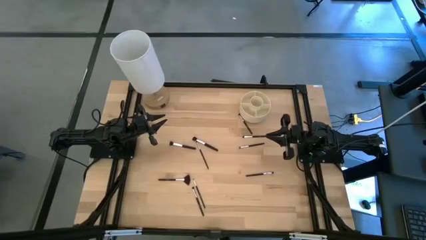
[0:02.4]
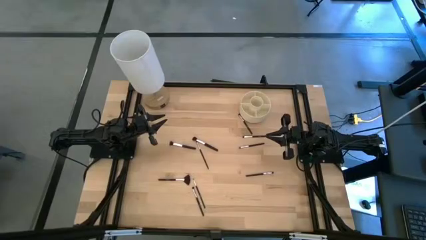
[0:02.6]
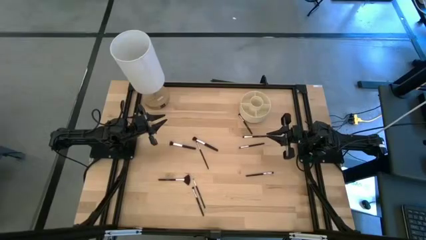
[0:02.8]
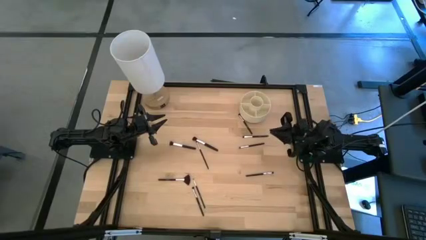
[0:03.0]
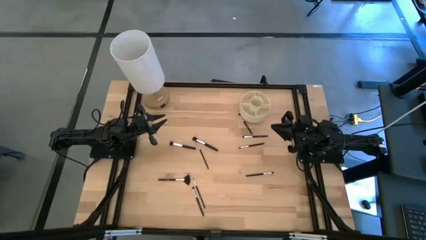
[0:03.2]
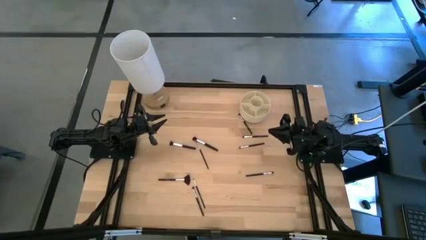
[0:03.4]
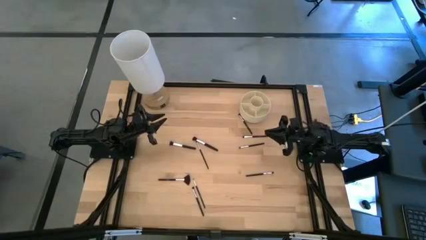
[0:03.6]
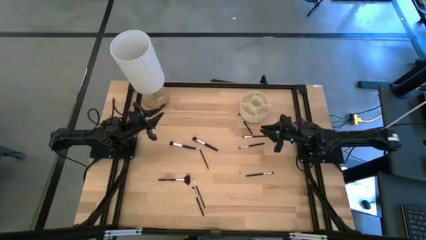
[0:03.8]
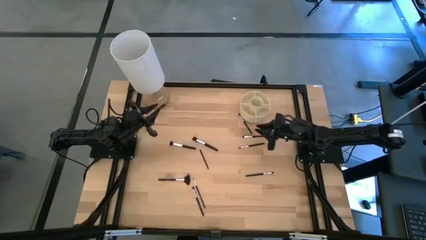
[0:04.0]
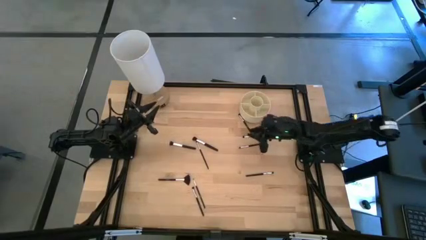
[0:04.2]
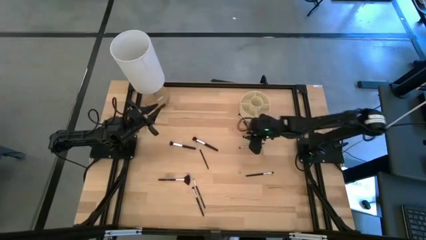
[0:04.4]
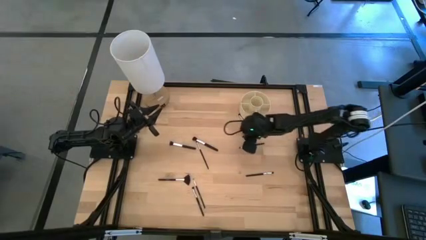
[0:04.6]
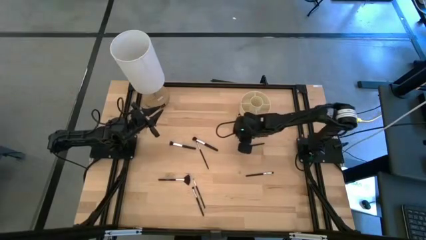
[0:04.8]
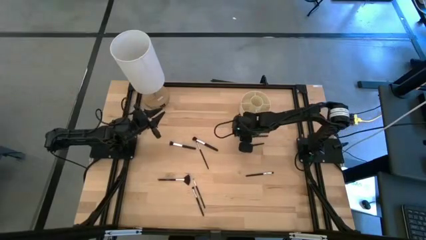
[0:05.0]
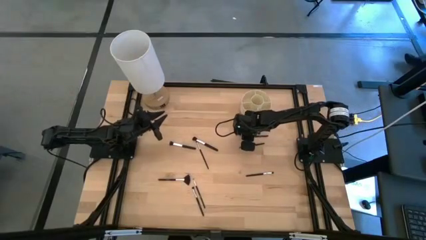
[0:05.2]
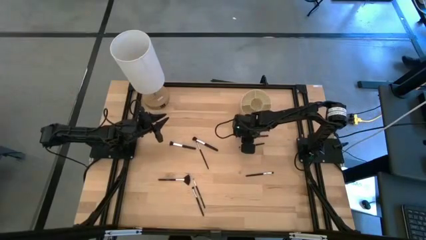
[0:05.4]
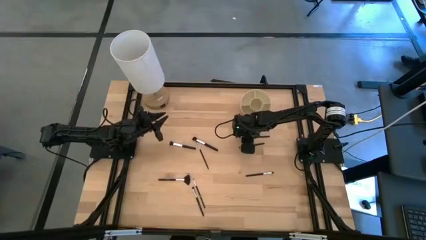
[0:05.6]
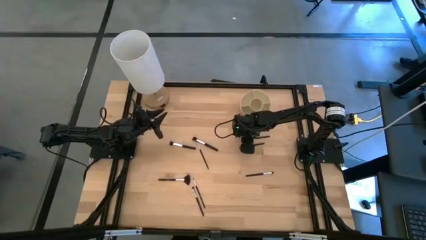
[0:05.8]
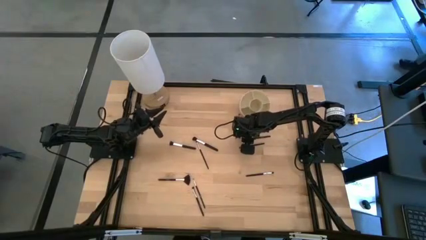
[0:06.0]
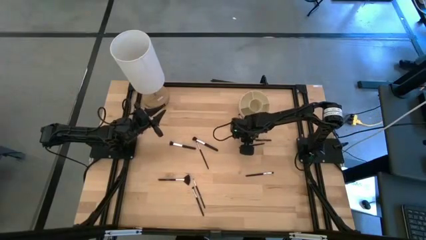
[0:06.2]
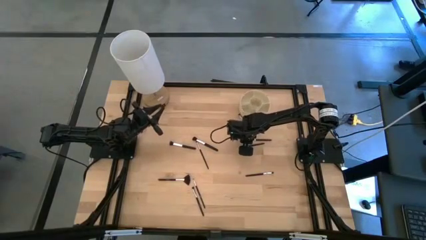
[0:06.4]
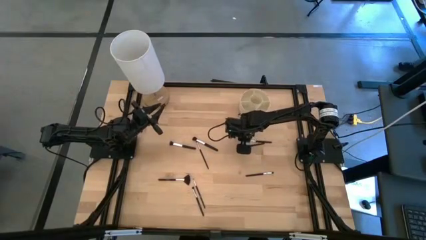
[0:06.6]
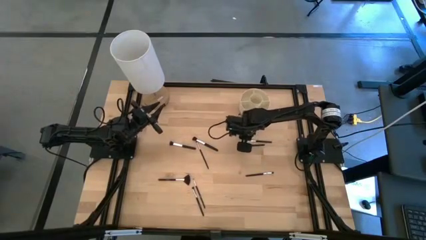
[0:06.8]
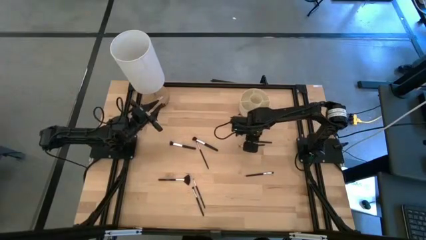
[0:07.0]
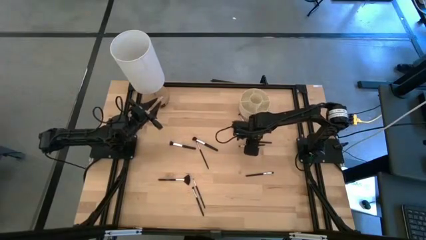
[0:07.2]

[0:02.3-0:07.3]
Task: Sort items
Put the foundation brush into the pen organizer

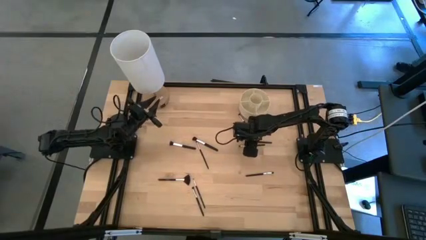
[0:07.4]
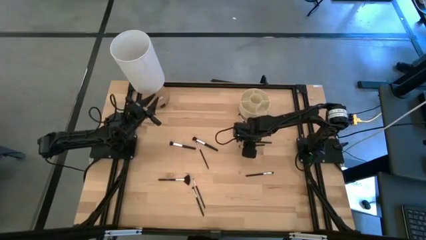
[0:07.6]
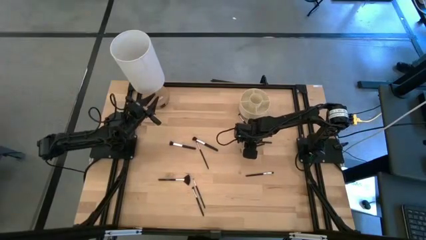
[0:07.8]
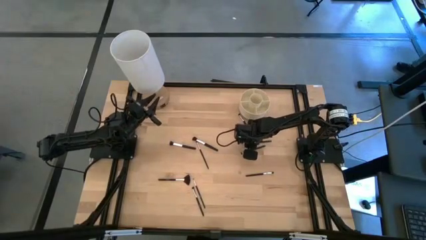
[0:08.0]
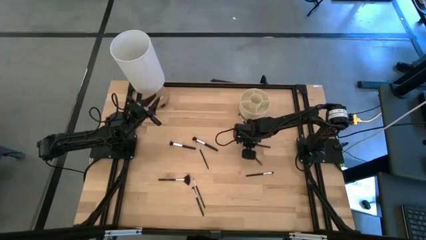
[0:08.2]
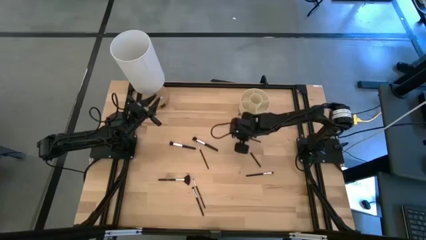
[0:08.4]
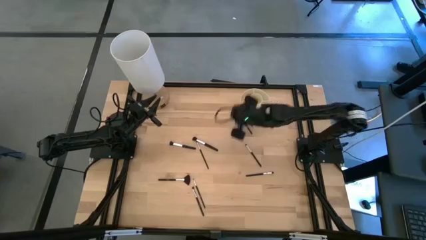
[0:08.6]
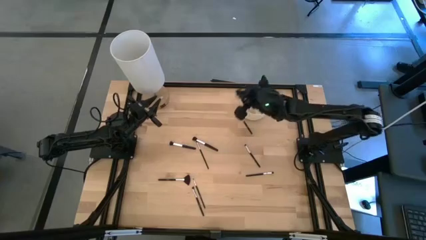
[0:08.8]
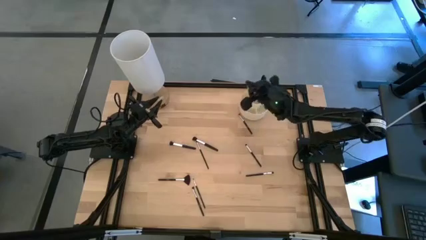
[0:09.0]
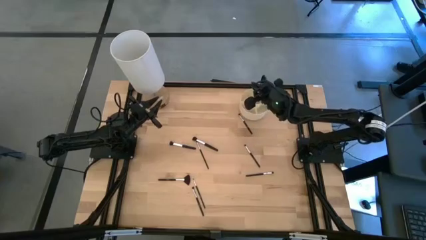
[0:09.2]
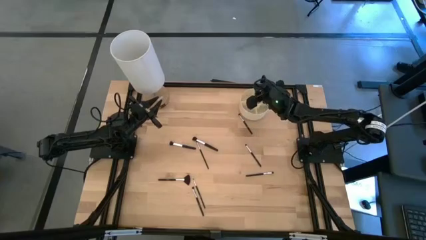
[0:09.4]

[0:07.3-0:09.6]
Put the foundation brush into the pen organizer

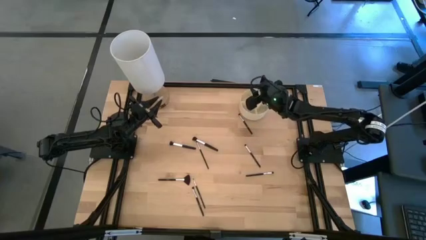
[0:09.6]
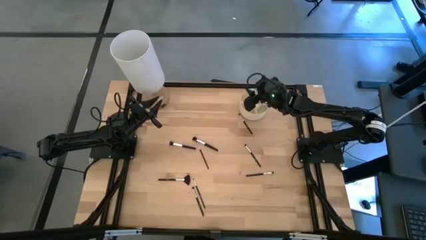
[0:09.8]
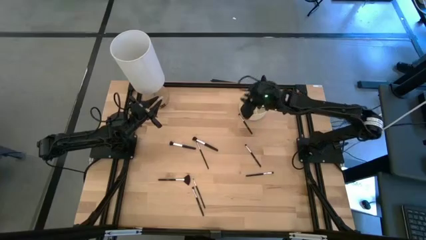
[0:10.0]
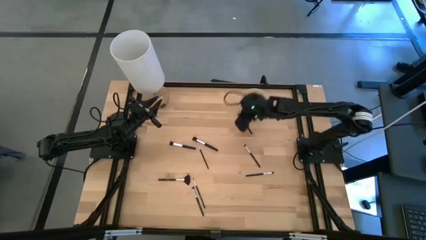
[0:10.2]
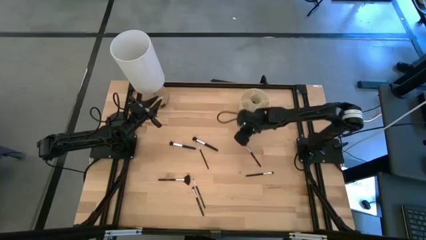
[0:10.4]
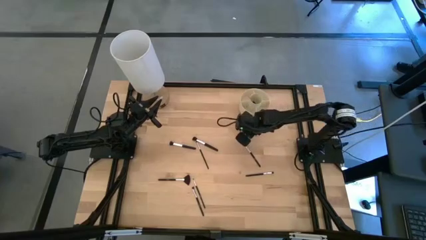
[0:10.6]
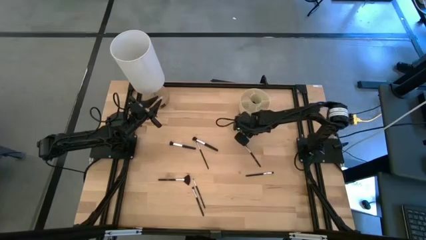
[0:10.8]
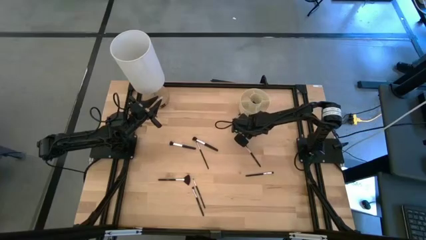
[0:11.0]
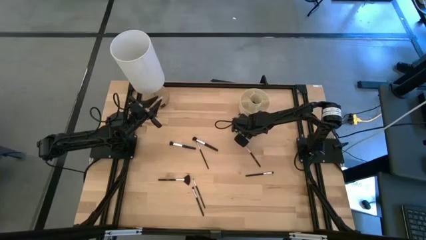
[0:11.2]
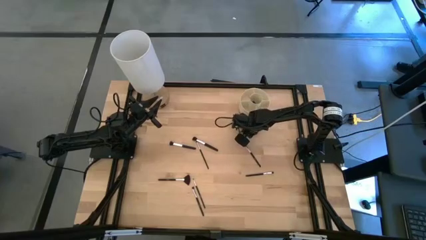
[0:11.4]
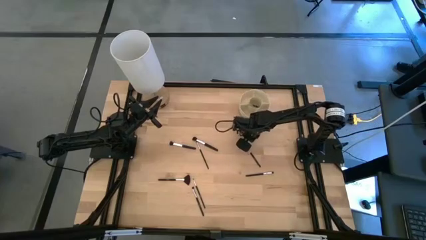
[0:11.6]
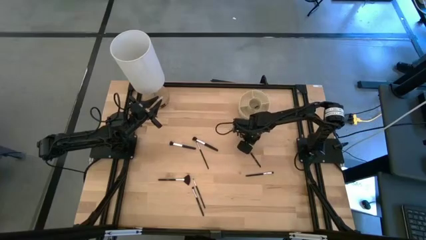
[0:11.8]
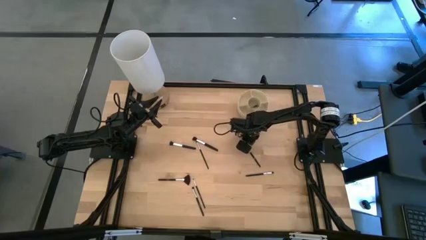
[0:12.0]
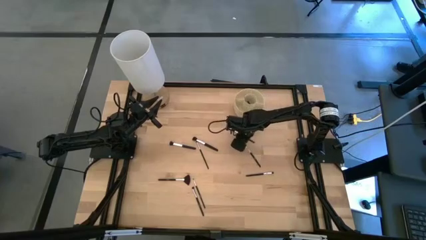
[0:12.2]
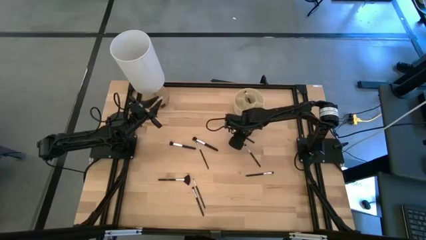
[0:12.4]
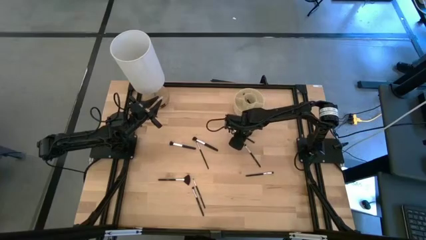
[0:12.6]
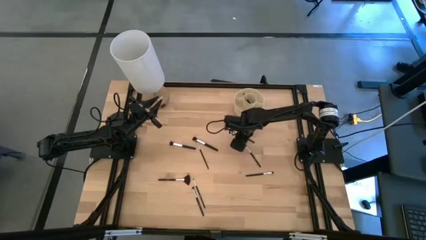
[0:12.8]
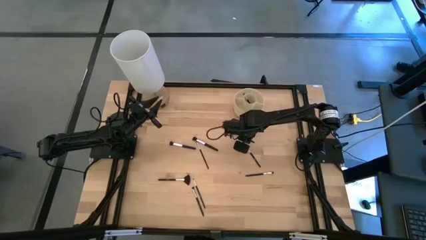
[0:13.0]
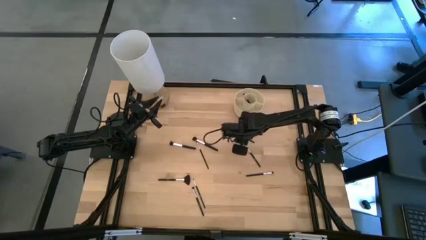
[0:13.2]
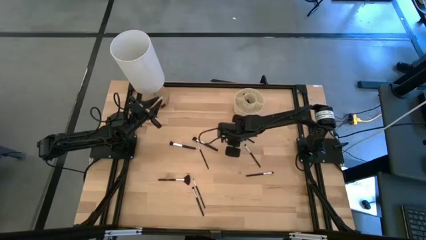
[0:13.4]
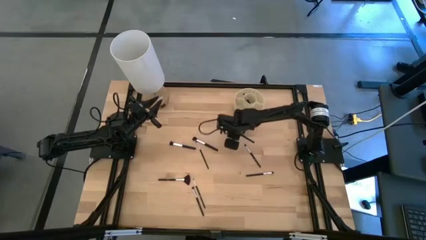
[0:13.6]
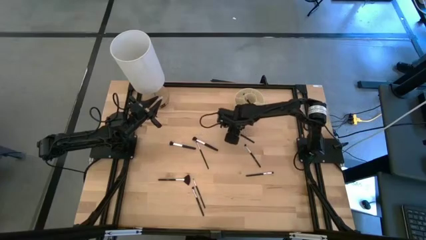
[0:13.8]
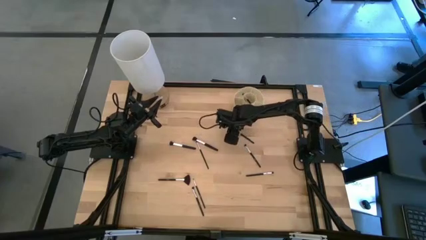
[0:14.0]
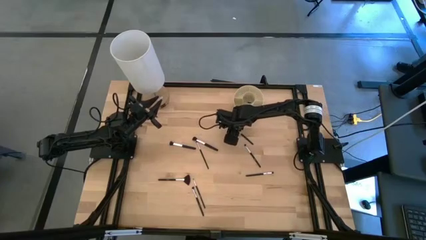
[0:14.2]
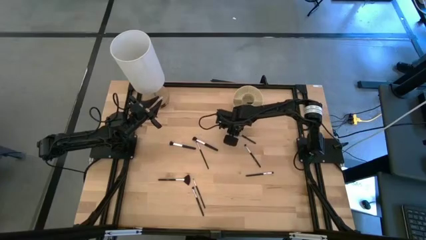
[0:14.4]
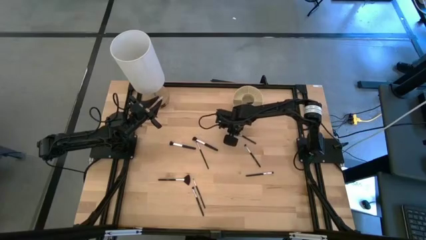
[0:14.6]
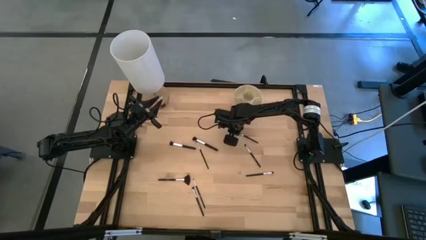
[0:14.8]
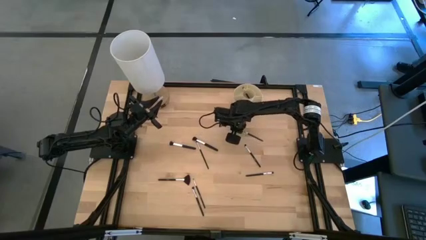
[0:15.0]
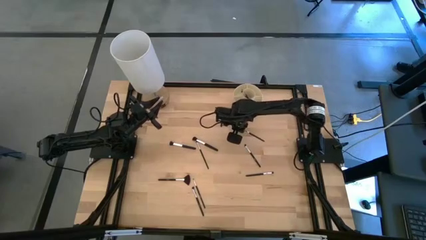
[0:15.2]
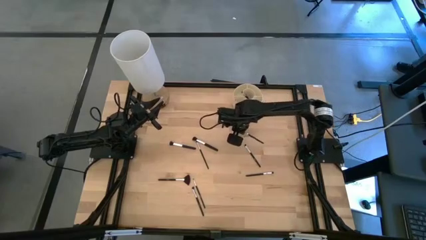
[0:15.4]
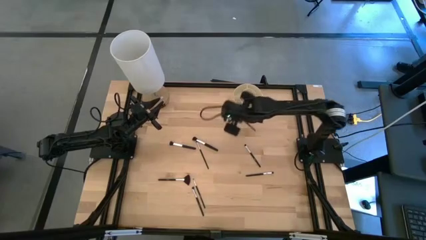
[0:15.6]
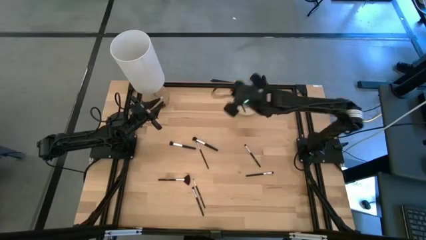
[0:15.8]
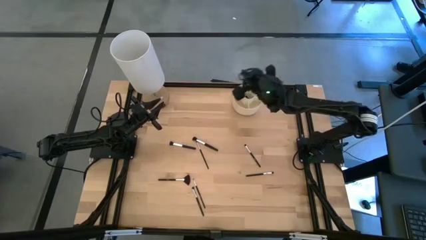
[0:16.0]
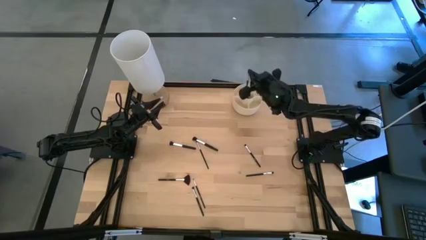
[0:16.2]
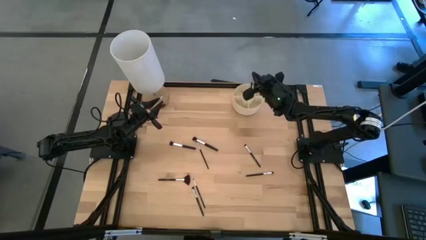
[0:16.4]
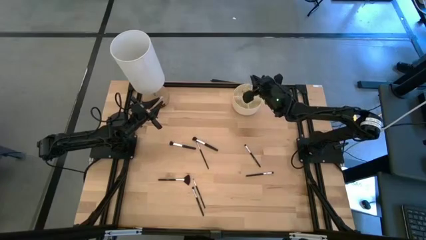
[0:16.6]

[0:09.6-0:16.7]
Put the foundation brush into the pen organizer

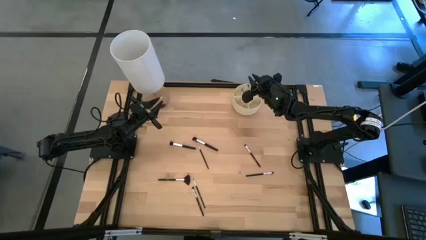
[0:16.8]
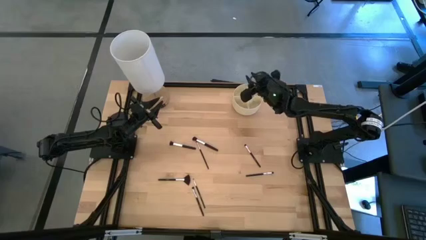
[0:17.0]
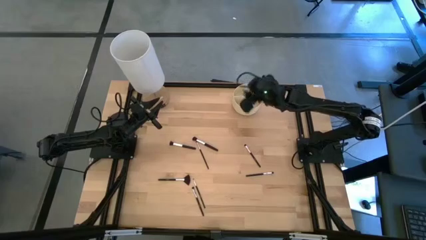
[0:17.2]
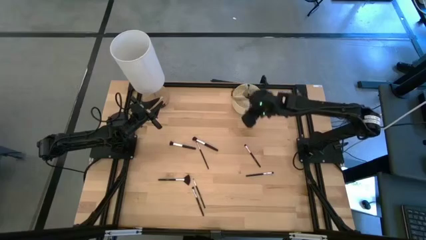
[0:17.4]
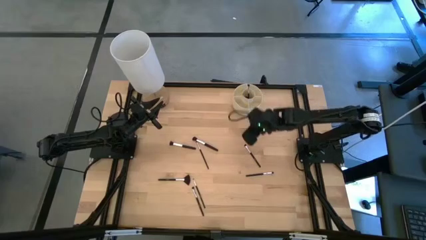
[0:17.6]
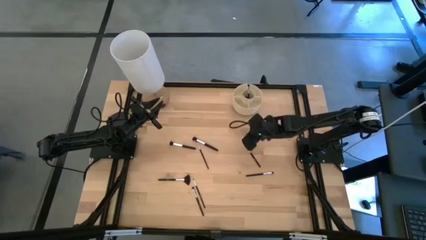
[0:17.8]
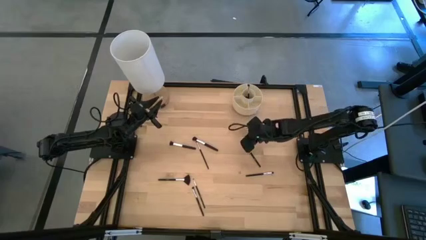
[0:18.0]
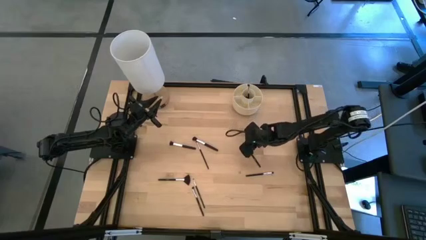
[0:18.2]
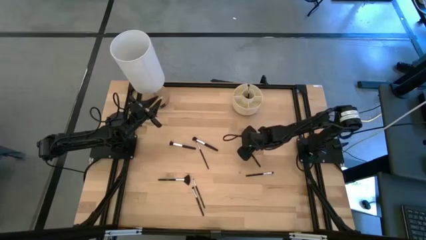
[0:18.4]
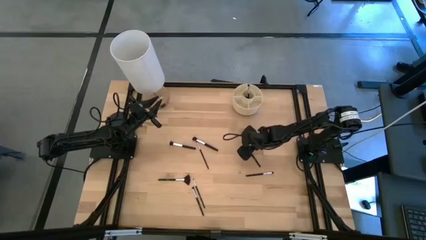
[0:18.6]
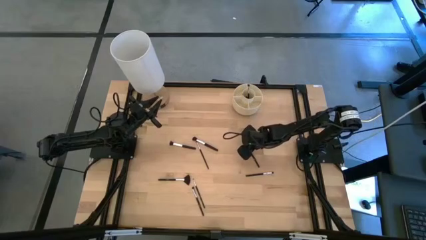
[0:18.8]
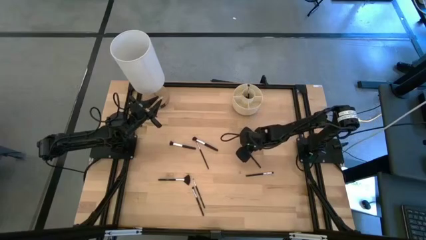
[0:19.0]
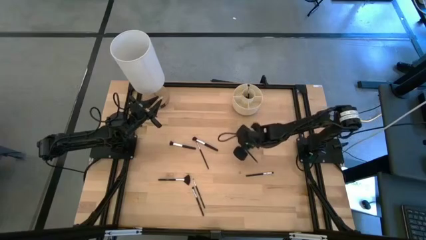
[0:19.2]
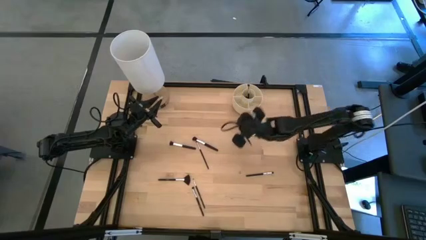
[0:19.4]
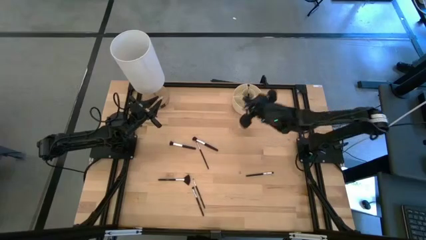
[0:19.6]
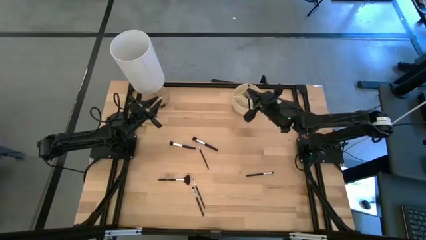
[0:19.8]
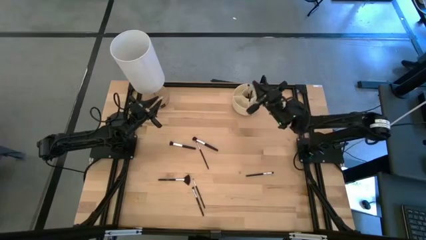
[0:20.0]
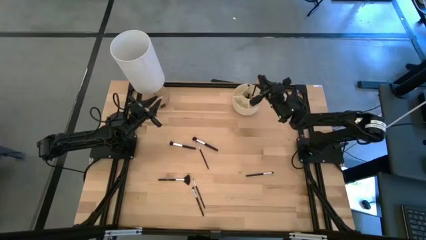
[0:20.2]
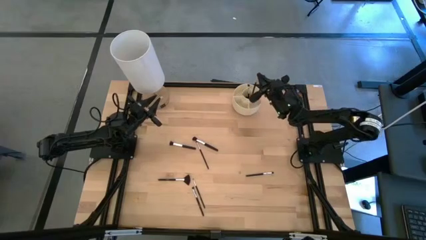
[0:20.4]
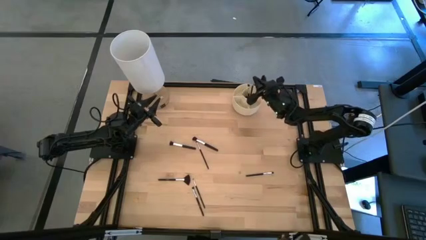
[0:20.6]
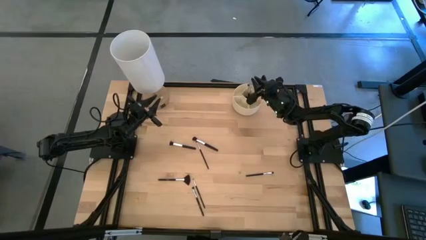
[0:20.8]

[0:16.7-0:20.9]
Put the black makeup brush into the pen organizer
